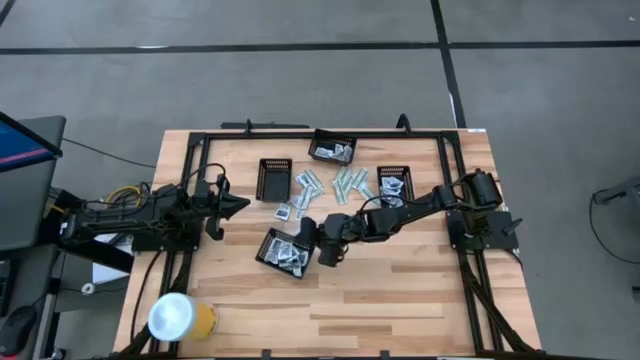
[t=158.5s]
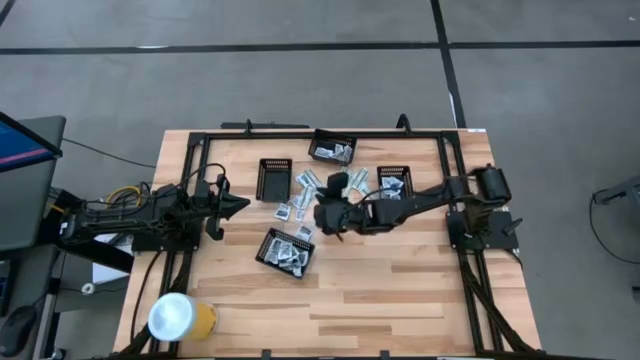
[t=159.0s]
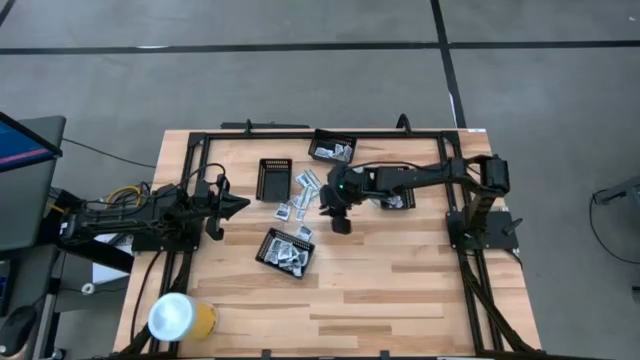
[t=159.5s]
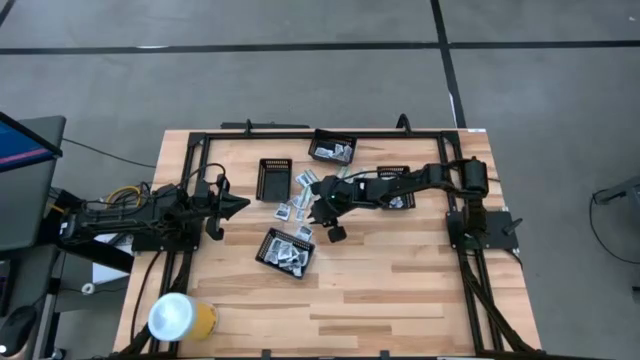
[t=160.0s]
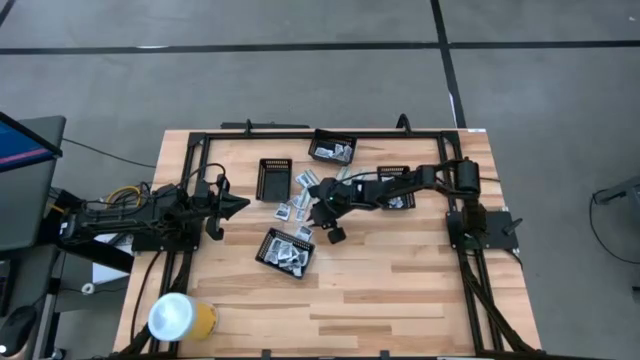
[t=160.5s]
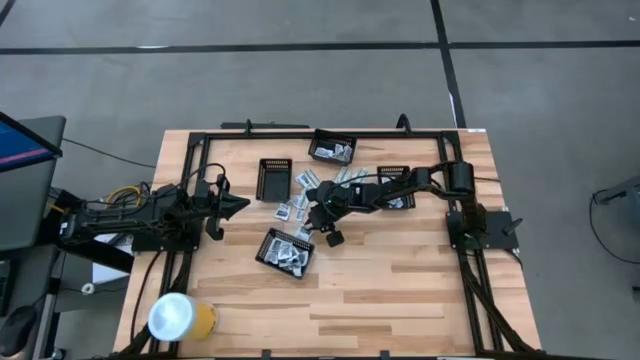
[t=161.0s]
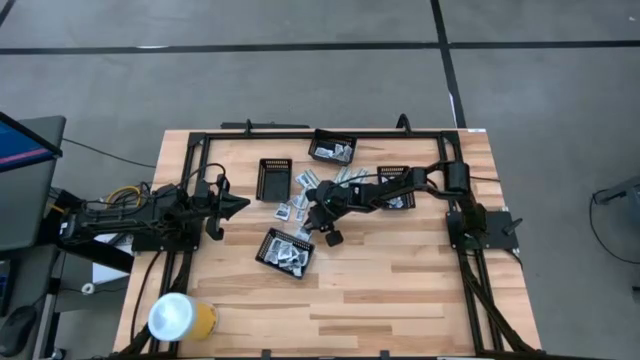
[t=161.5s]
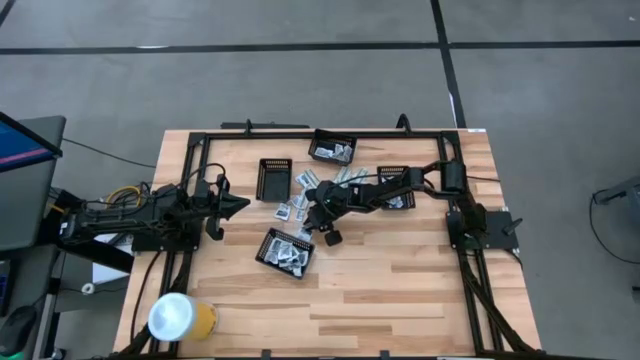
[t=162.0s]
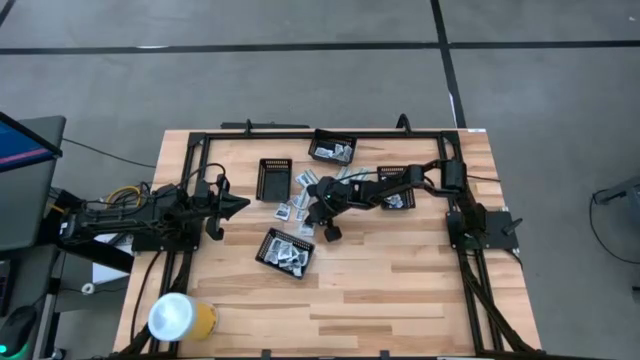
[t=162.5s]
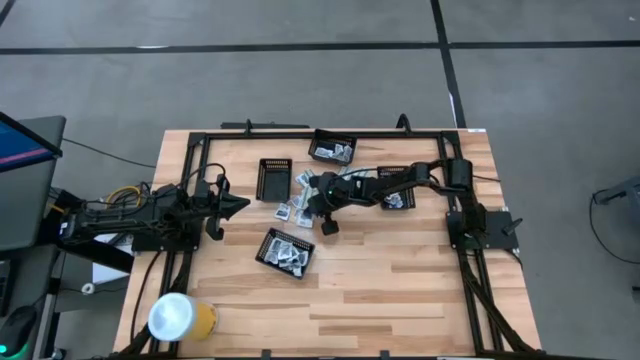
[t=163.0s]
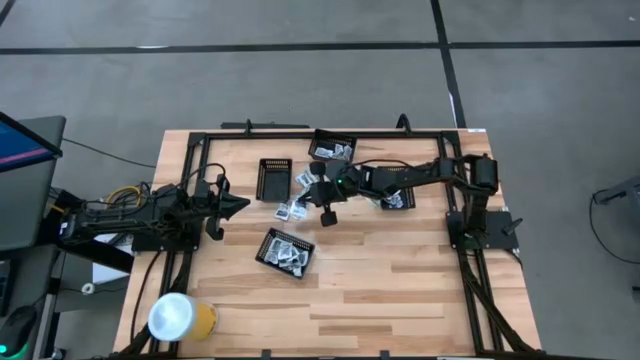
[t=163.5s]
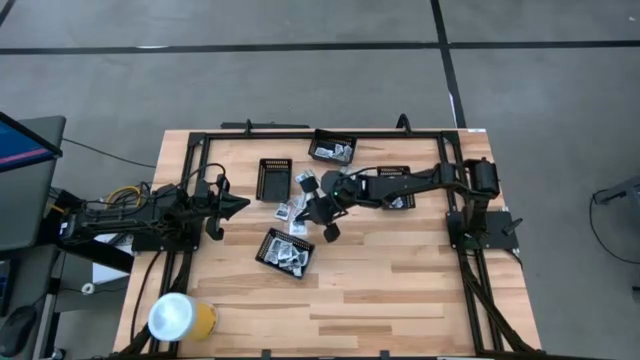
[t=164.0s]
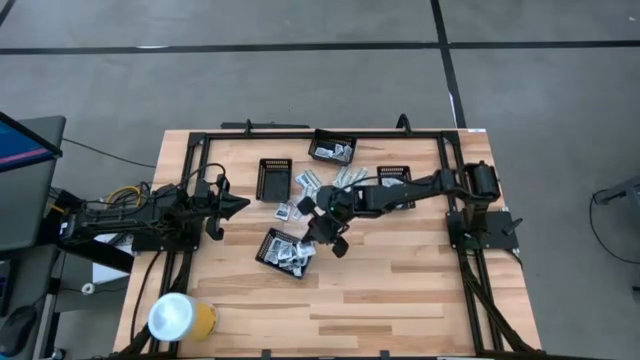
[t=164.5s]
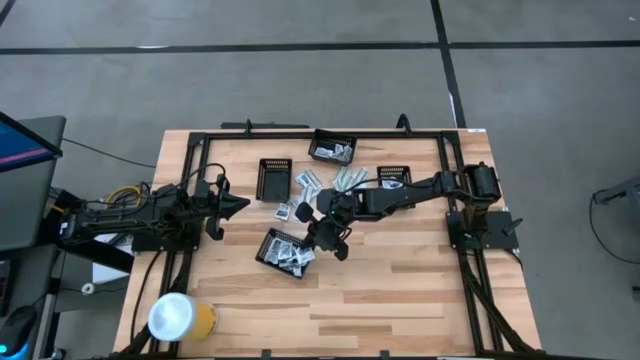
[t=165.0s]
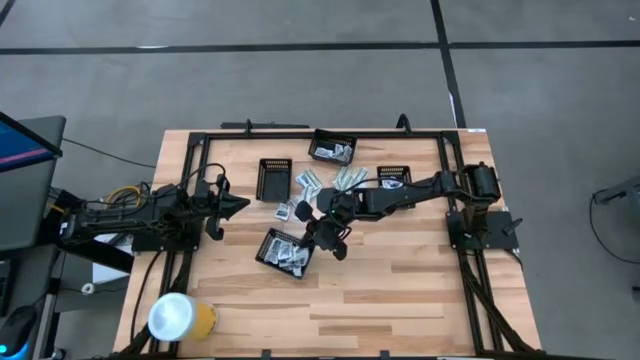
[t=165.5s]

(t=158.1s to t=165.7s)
Task: Pick & Place First Aid Supplies
Put the white towelette pack into the bottom black bin

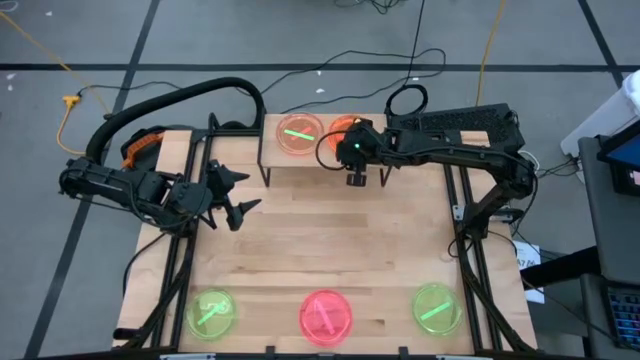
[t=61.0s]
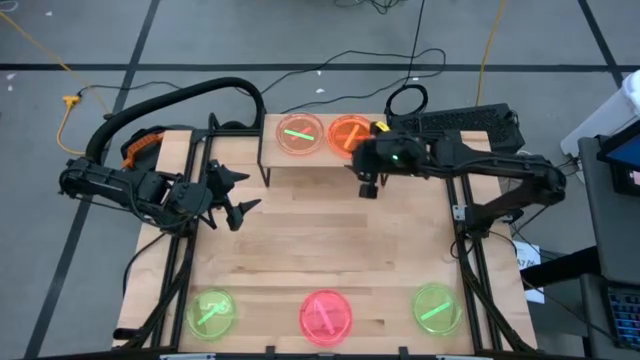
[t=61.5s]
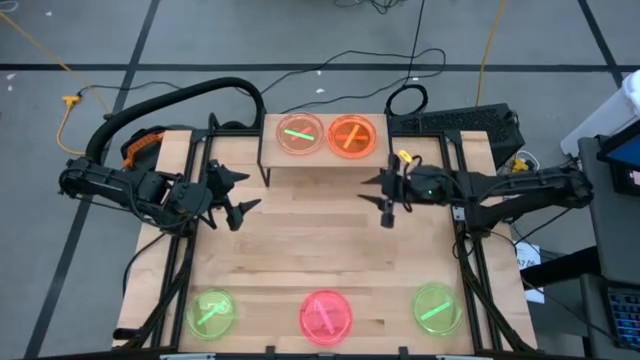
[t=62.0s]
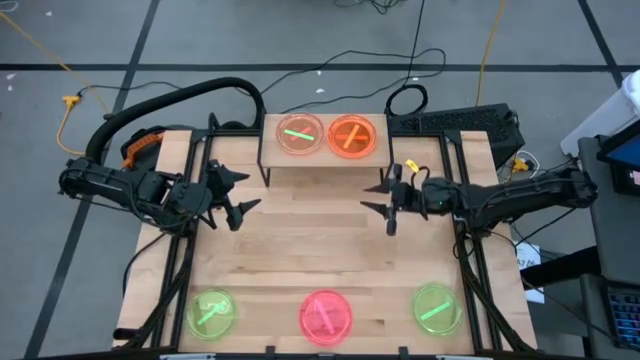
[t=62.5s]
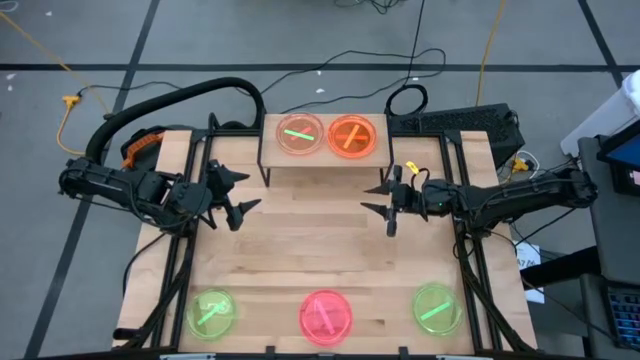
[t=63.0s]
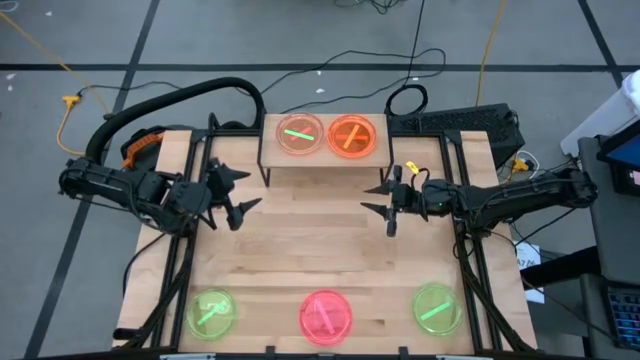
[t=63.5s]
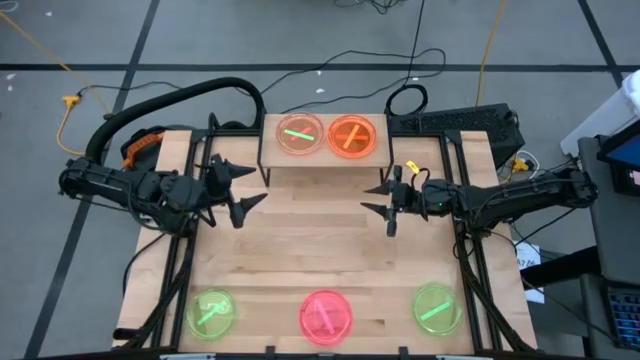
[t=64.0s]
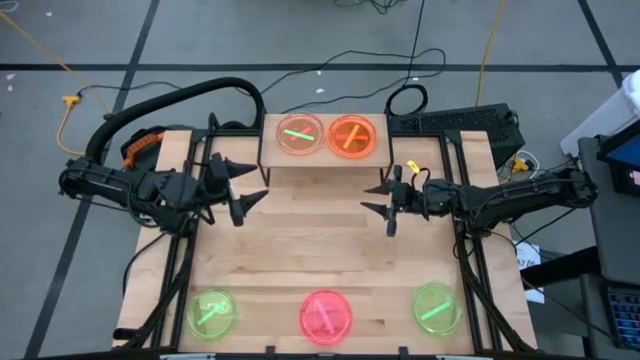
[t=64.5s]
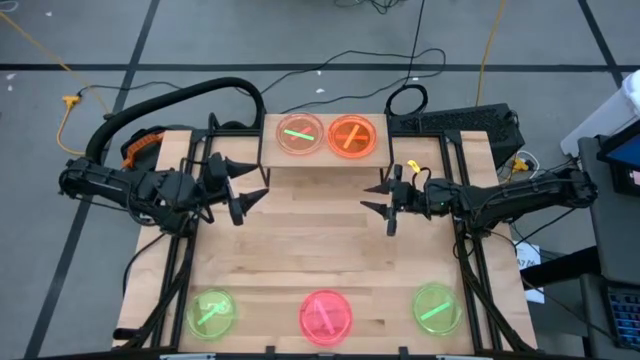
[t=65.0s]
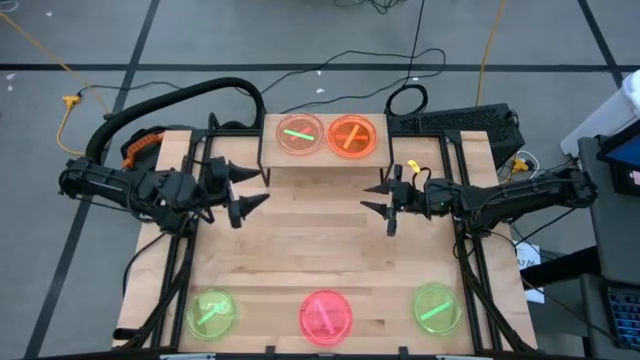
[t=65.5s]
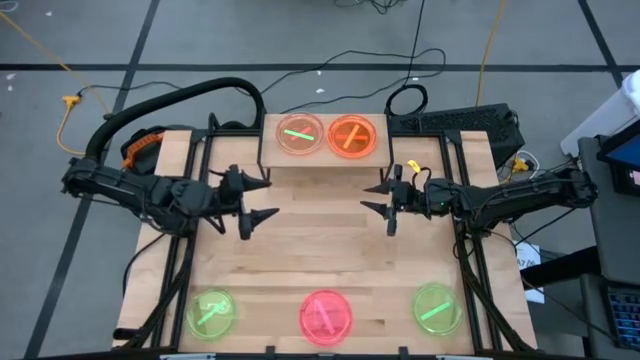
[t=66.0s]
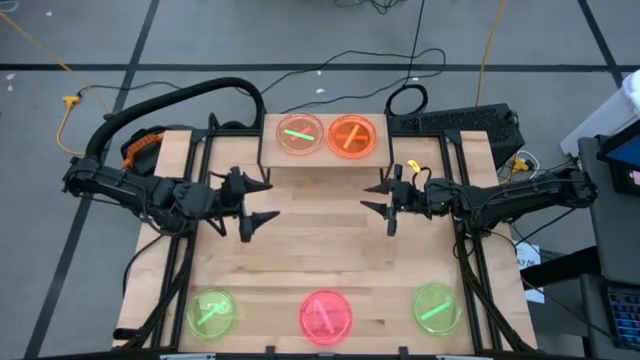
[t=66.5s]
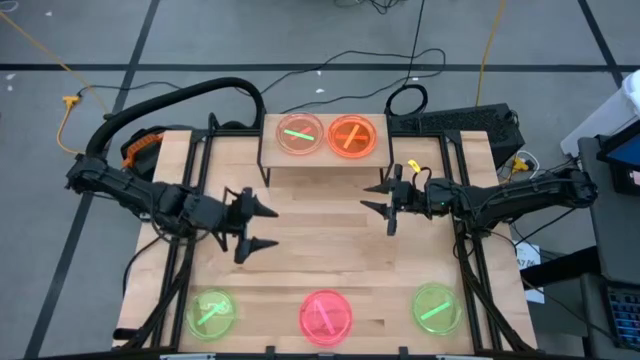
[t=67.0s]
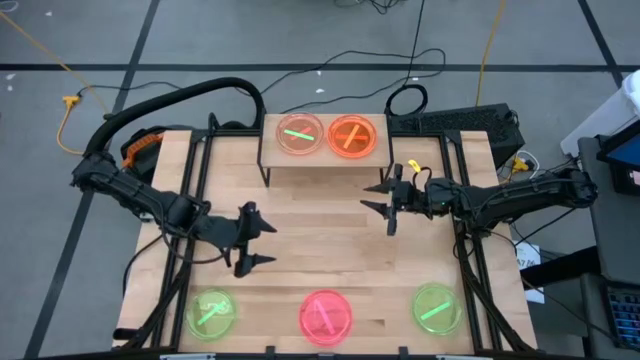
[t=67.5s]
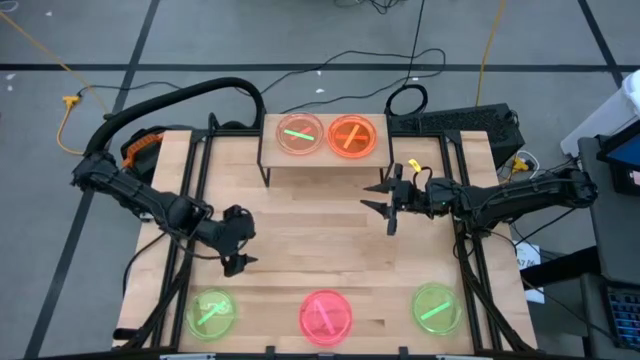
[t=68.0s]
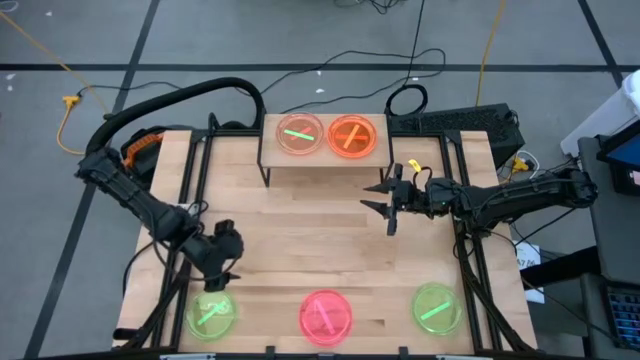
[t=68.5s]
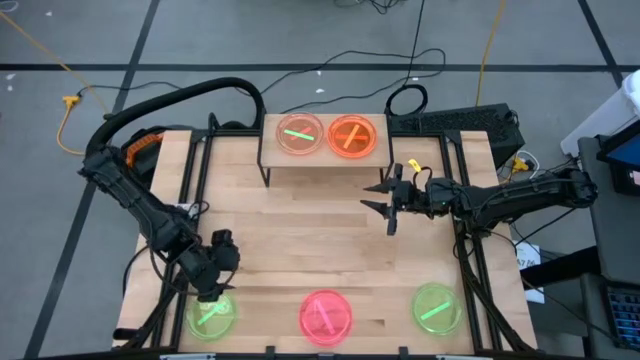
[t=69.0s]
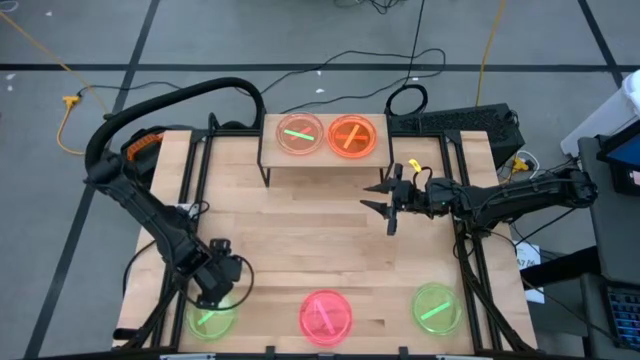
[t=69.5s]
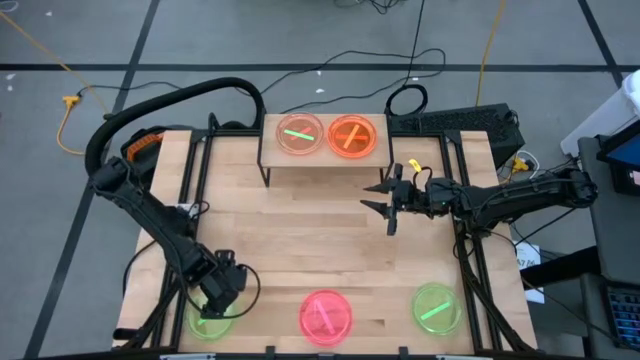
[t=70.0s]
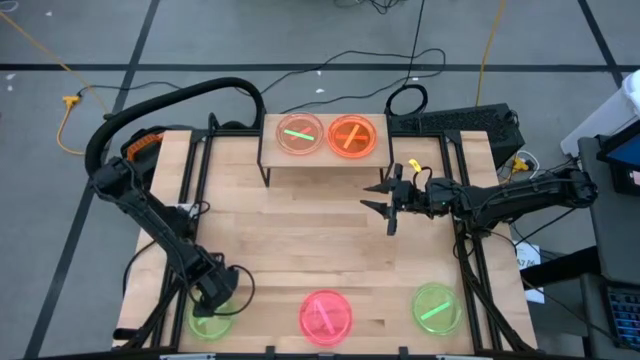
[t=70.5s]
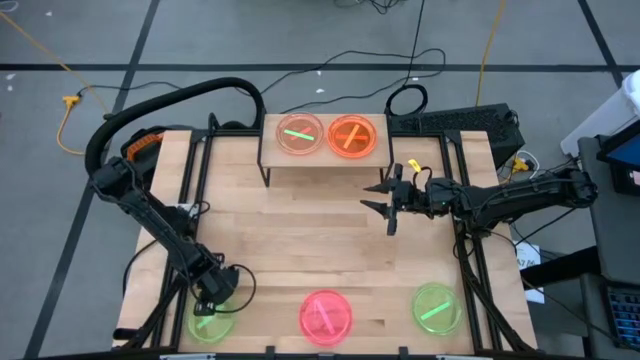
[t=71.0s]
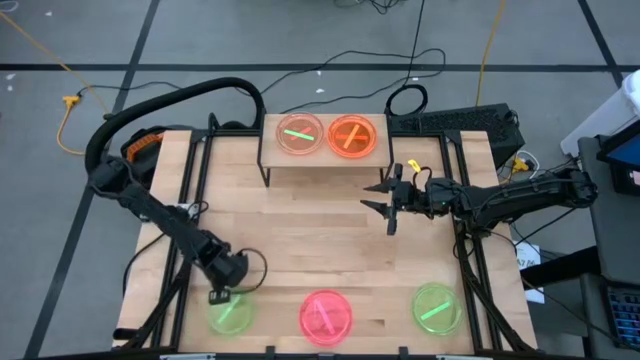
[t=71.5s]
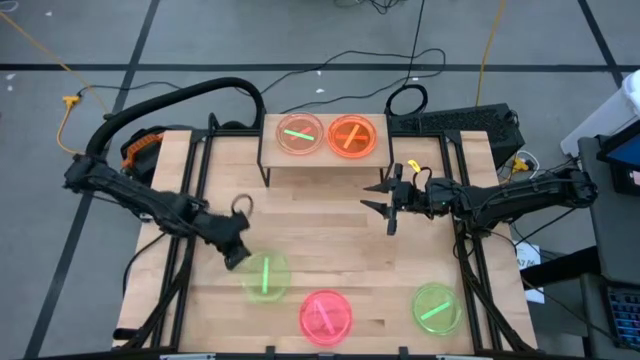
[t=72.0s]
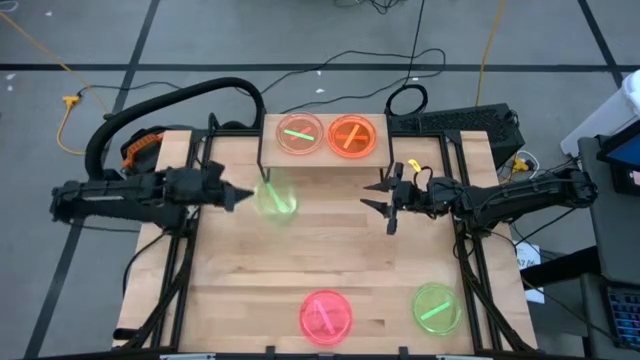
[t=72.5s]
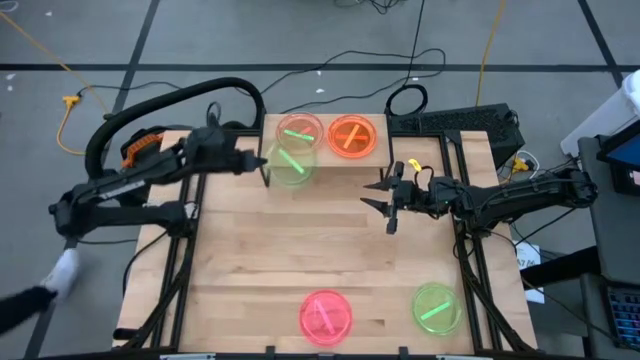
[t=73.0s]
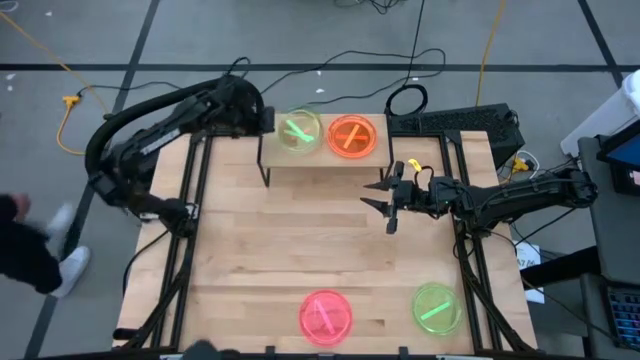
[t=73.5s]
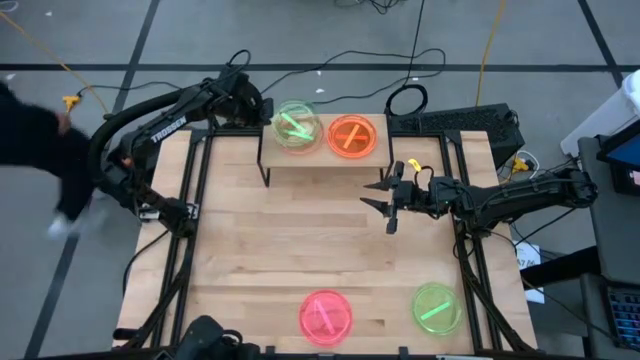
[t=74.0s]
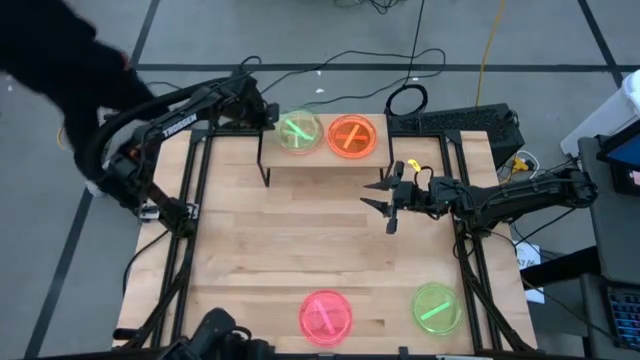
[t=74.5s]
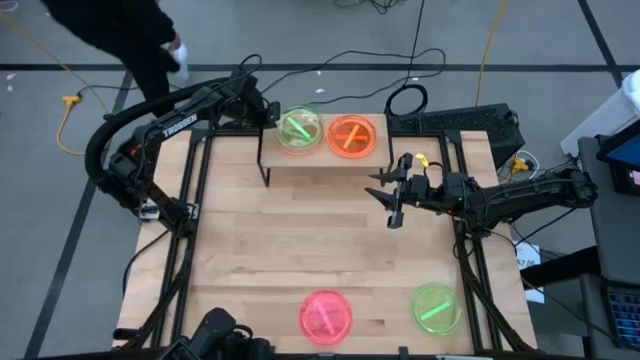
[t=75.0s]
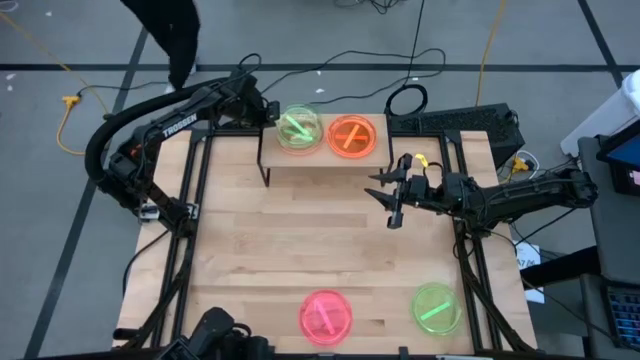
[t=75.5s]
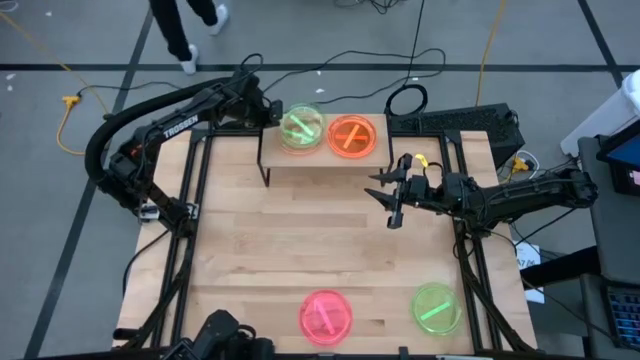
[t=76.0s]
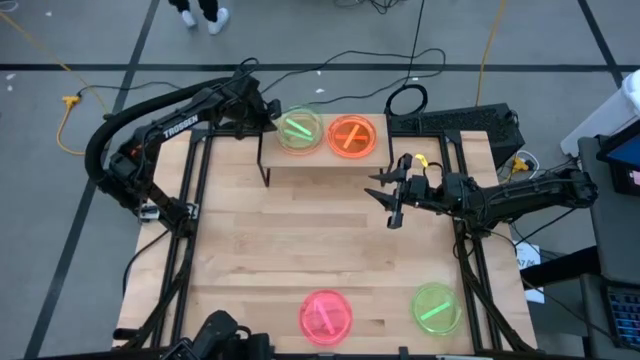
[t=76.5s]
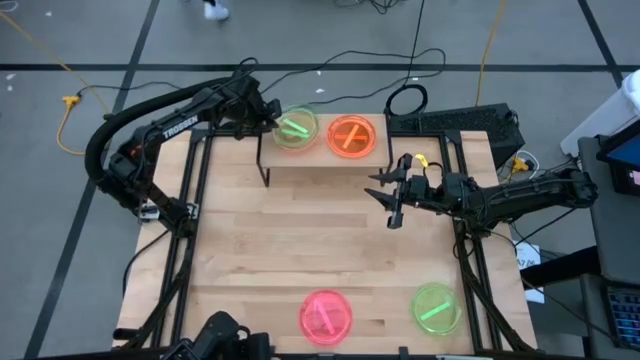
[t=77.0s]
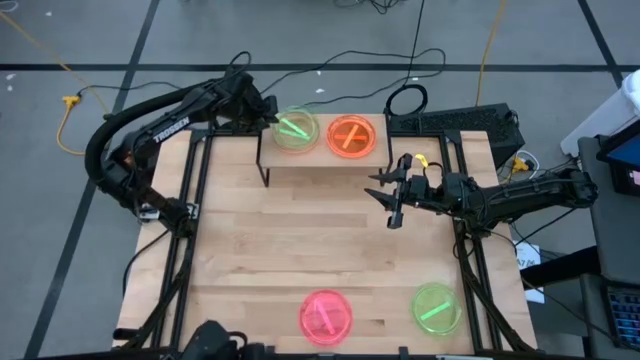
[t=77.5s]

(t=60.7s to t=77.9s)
Task: Place and stack plates onto a shelf
Stack the green plate on top of the green plate on the shelf
